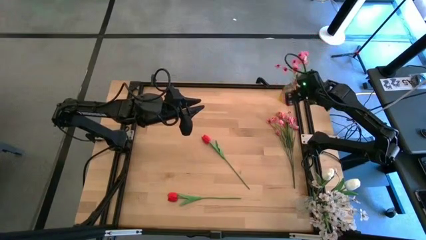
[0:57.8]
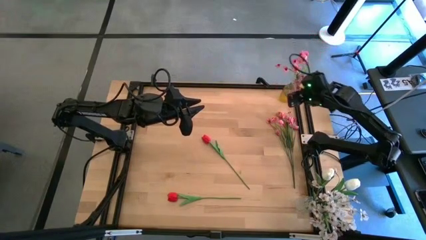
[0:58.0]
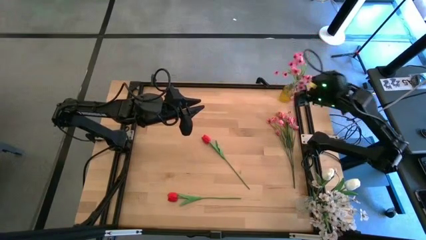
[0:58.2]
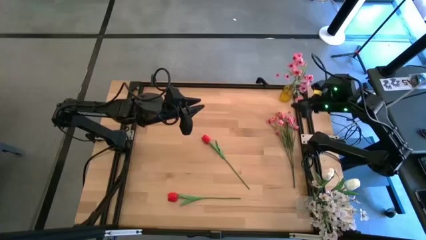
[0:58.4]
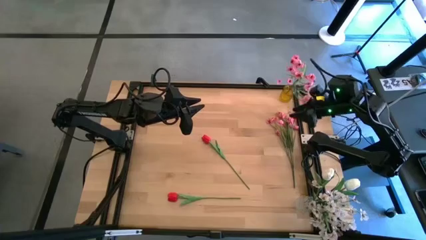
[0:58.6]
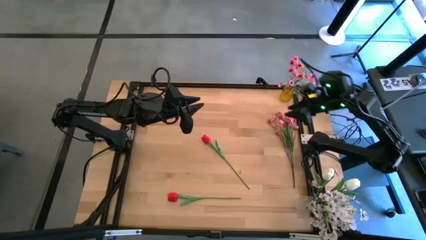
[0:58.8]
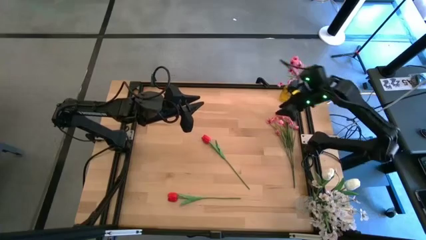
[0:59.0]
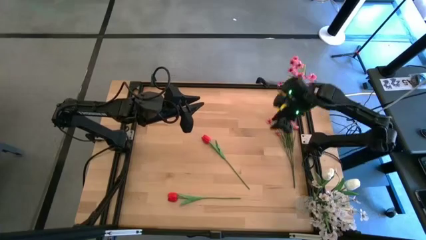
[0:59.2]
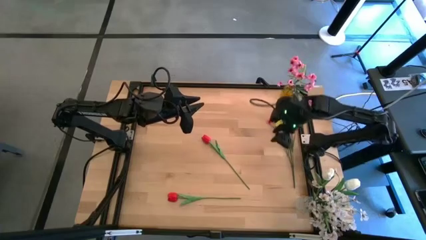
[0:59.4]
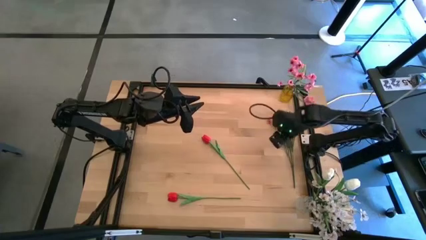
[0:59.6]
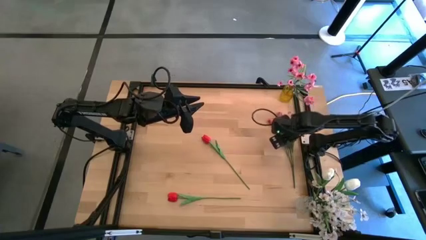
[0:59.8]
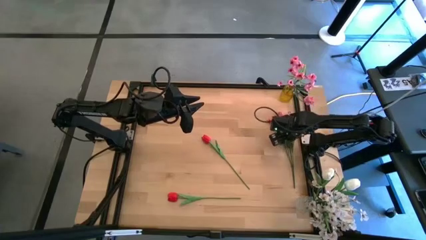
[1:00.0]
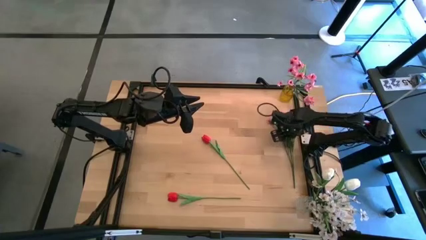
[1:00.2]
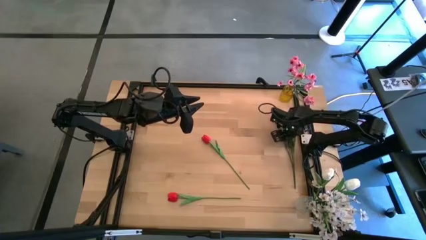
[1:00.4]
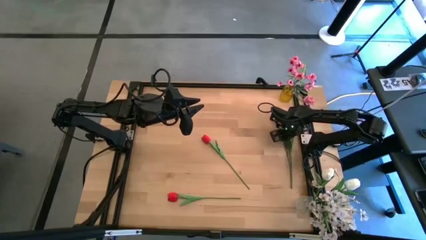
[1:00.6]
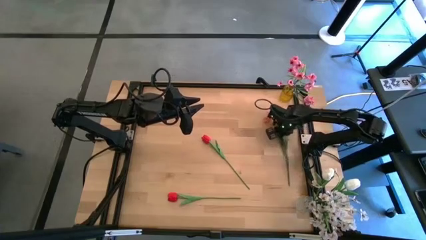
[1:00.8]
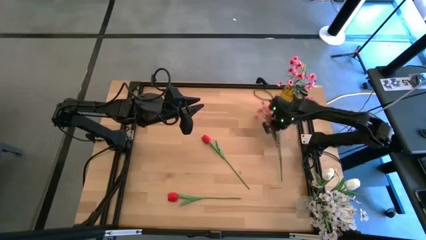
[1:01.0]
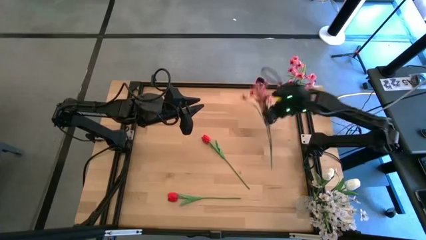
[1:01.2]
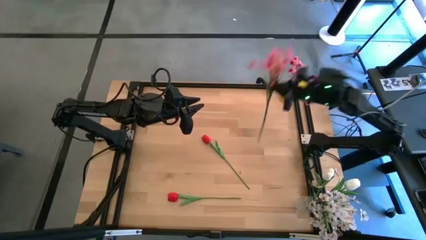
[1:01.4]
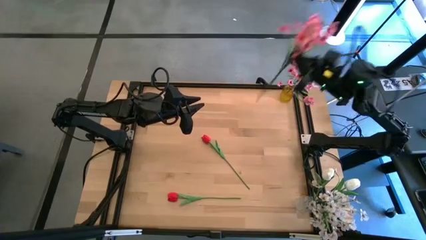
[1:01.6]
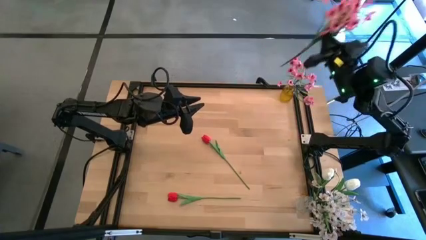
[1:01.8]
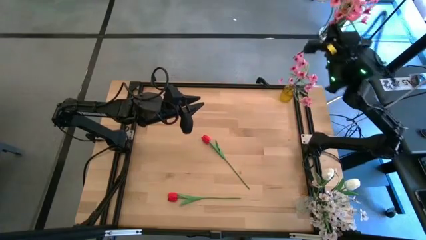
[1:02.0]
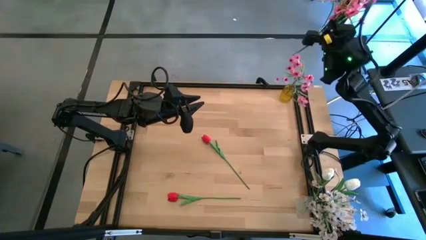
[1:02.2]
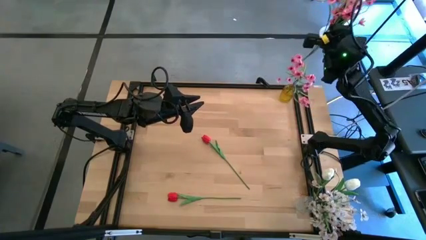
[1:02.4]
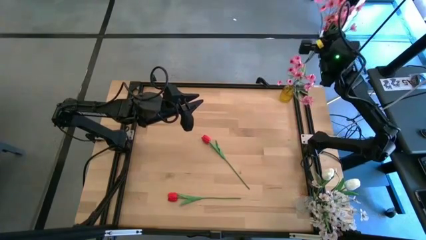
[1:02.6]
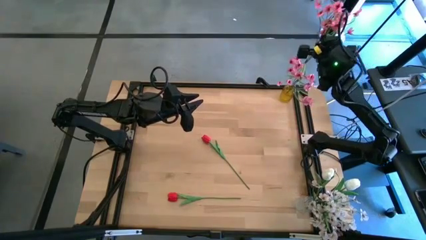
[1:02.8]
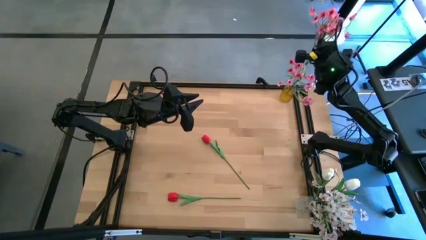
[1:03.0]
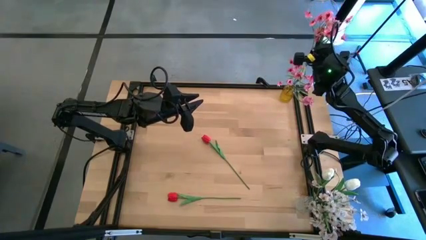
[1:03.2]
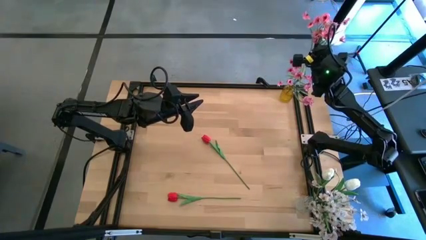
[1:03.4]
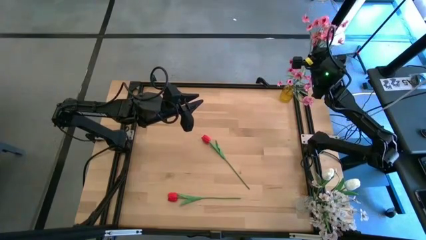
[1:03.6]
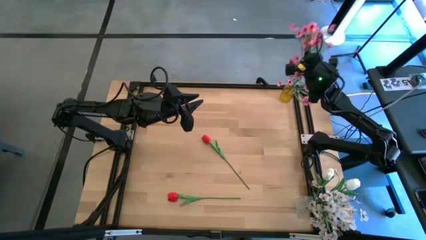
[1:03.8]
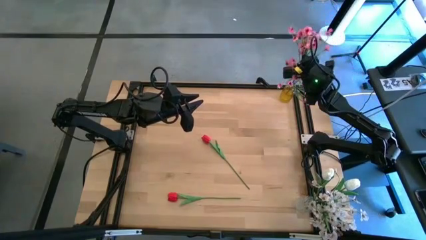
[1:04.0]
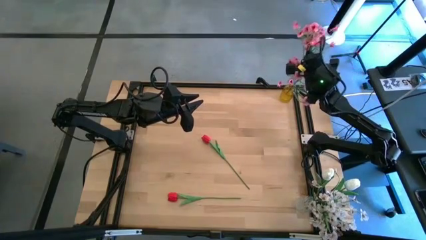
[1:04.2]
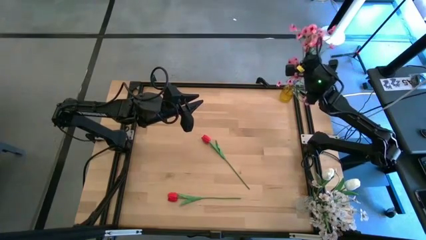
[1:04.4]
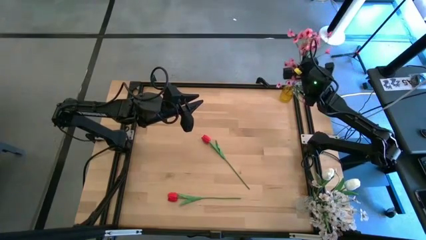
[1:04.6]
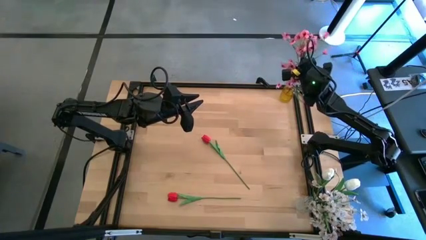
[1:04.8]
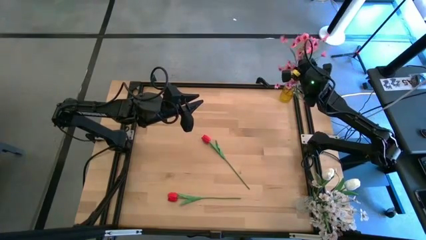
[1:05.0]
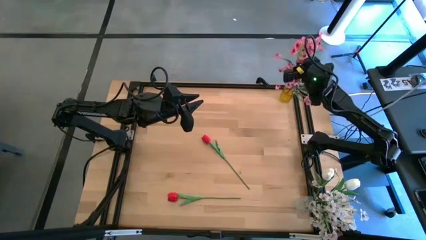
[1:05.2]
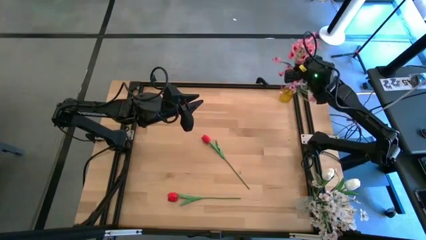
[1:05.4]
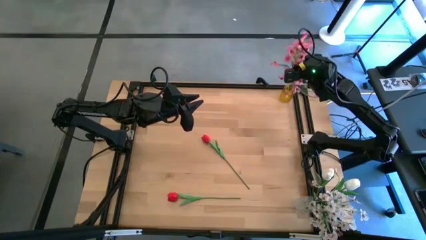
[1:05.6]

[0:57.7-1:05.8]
Task: Sort flowers into vase by color
Put the pink flowers into the yellow vase

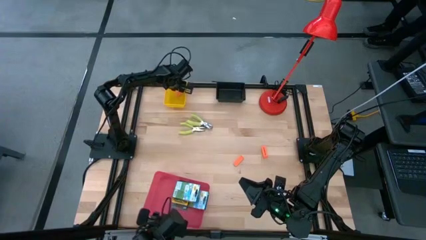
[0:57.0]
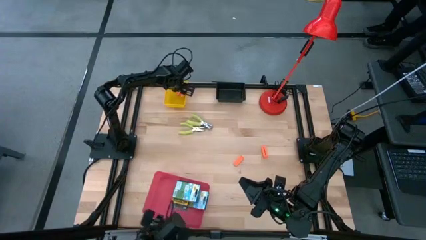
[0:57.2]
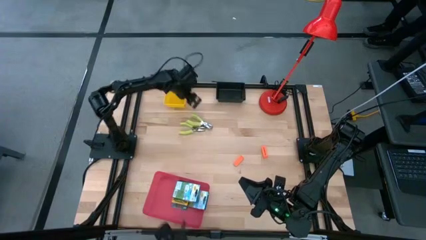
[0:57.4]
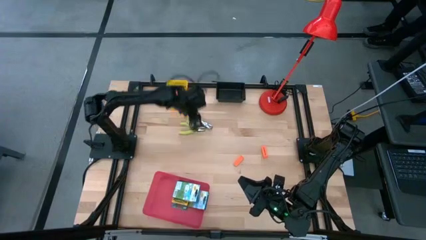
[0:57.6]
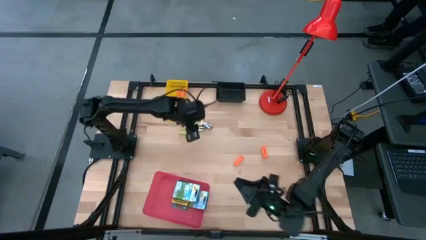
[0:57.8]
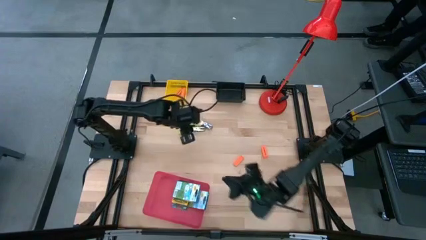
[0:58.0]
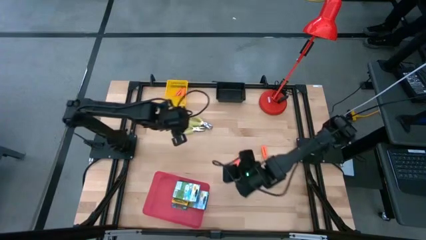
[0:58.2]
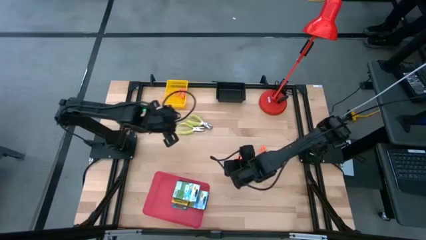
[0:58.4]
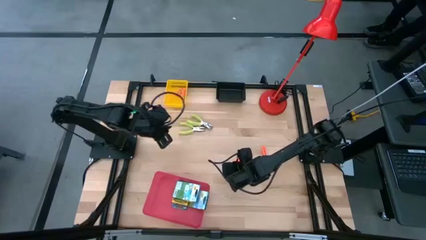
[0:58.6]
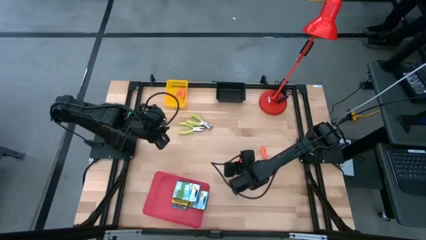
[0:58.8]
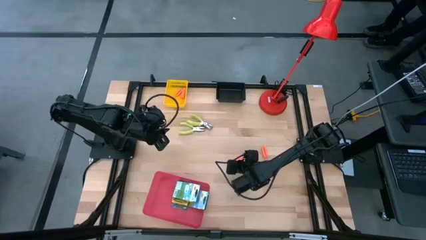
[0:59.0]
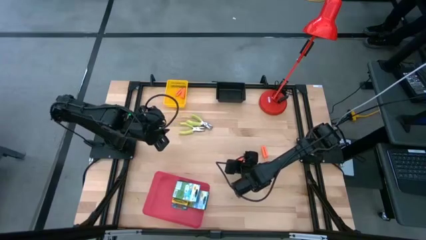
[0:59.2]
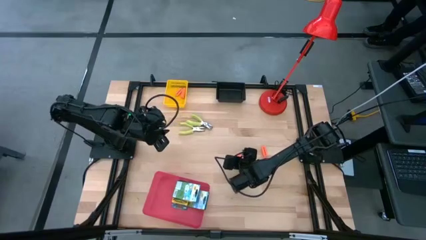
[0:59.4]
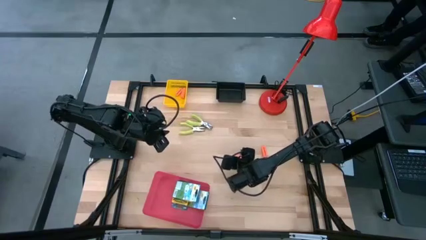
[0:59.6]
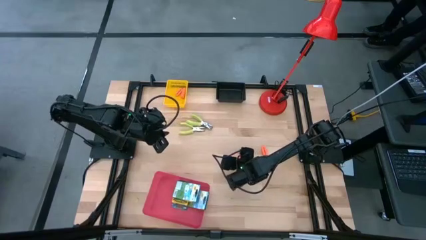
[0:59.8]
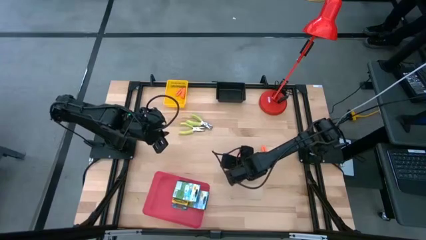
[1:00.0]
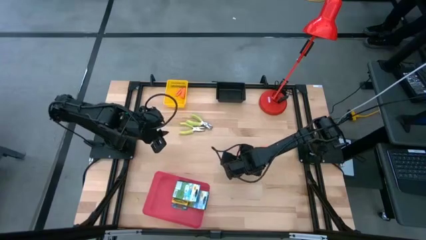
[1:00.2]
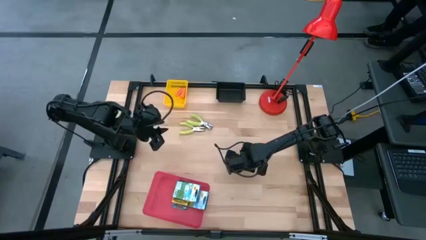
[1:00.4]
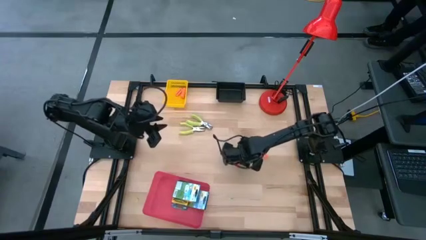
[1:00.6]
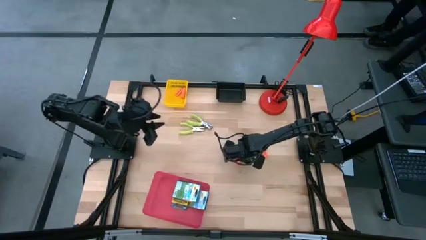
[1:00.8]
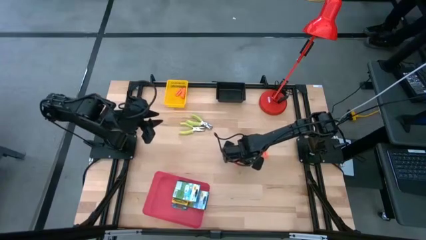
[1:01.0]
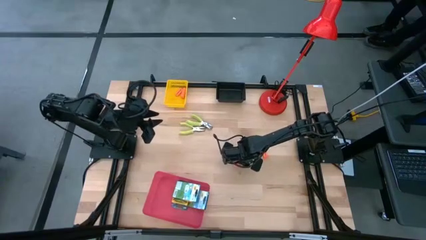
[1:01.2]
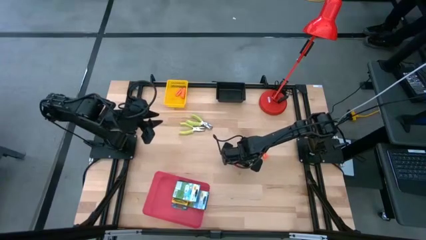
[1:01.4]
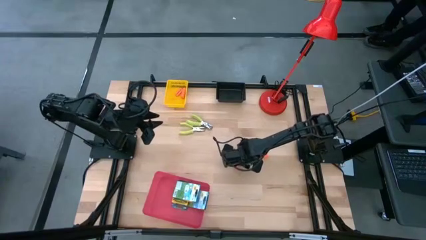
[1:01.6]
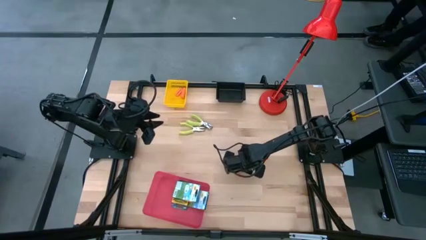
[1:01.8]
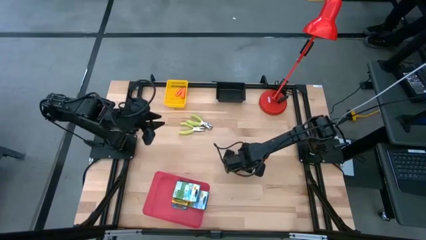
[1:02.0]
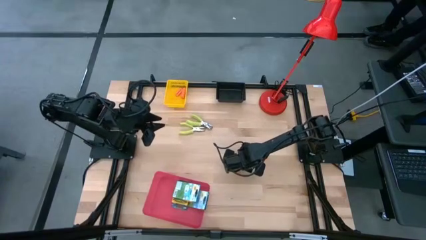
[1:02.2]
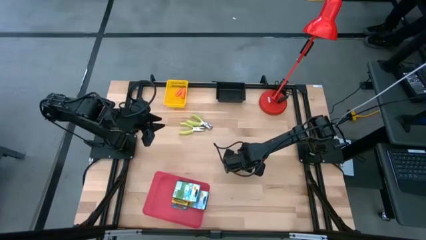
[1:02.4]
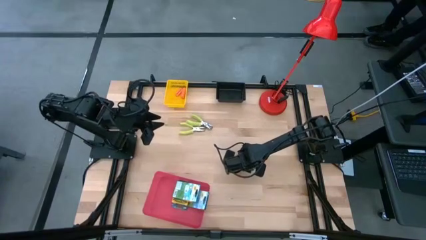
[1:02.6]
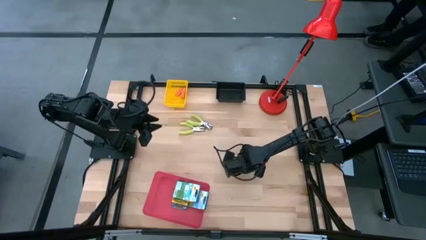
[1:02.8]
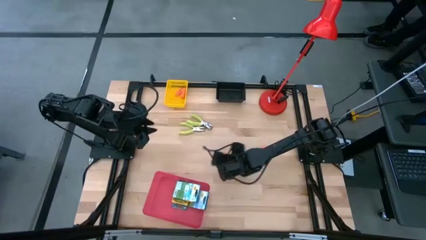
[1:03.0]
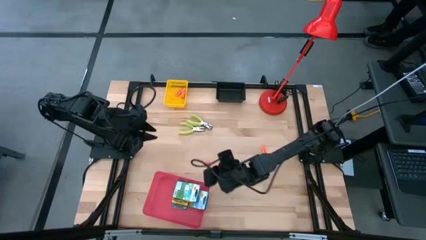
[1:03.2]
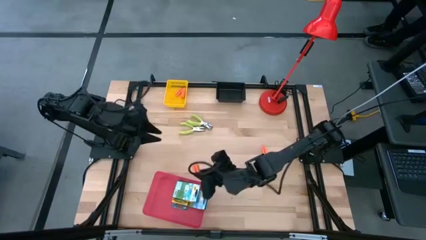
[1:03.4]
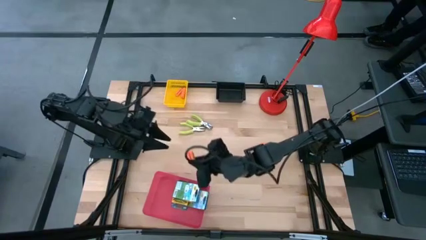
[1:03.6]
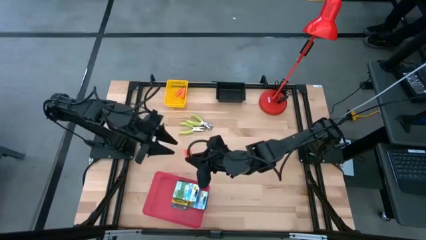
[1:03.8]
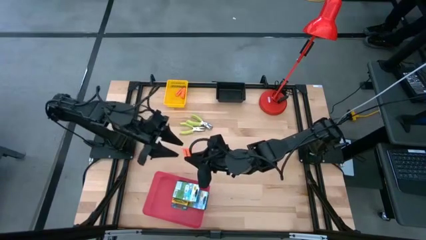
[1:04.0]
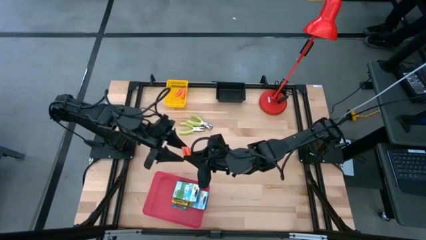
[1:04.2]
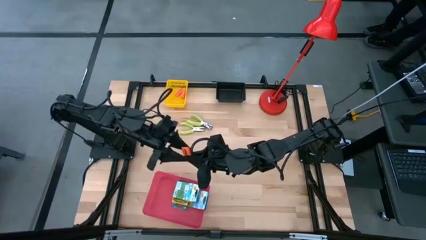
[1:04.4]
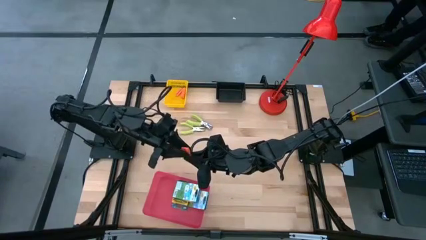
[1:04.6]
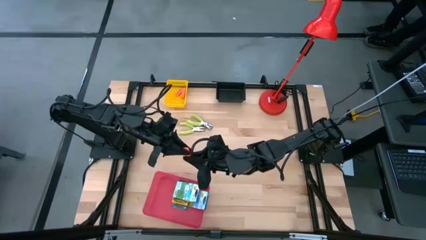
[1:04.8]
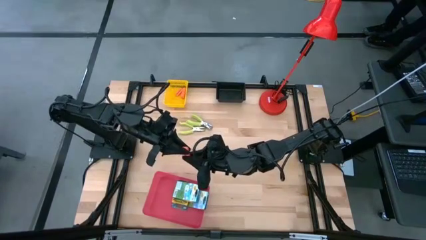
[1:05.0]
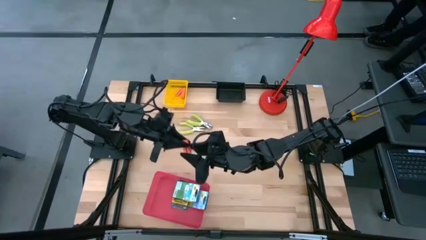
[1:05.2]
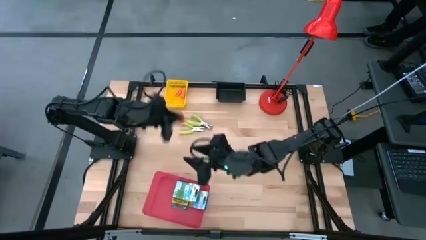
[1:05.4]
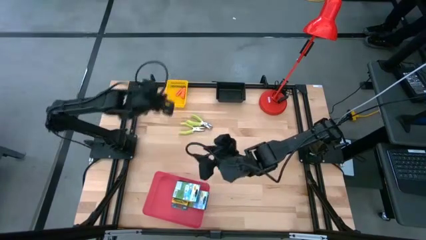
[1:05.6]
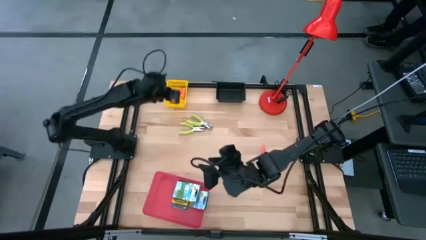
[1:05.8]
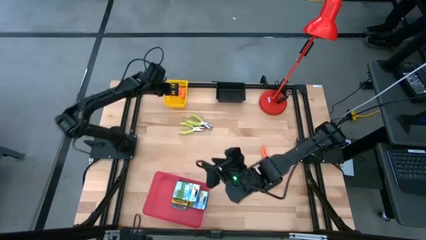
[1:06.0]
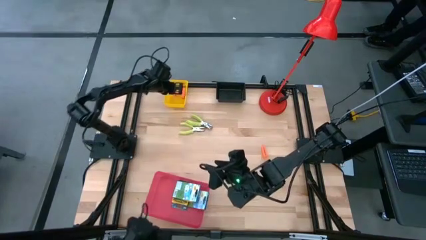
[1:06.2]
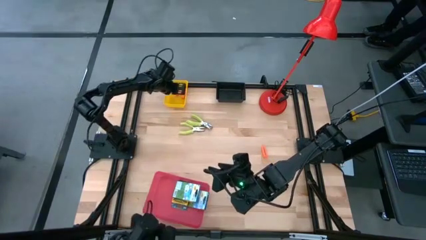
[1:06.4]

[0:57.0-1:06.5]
Task: Pick & Place School Supplies
Put the orange eraser into the yellow bin
